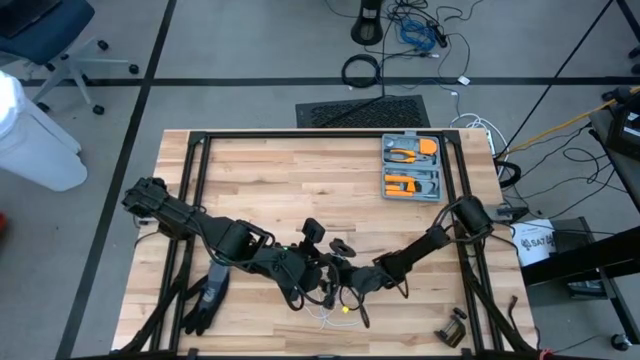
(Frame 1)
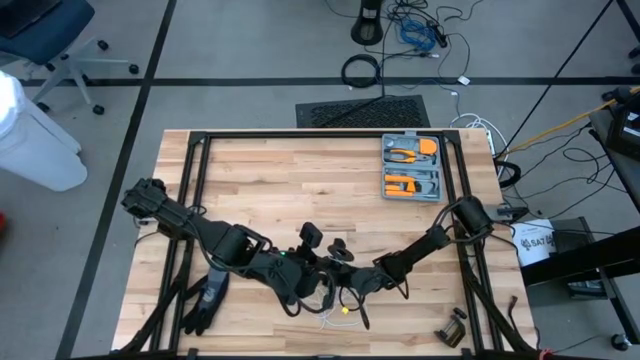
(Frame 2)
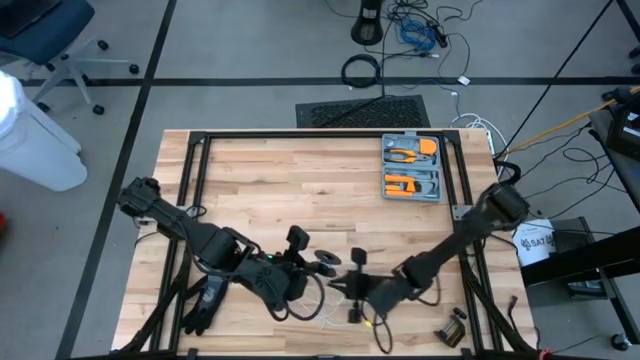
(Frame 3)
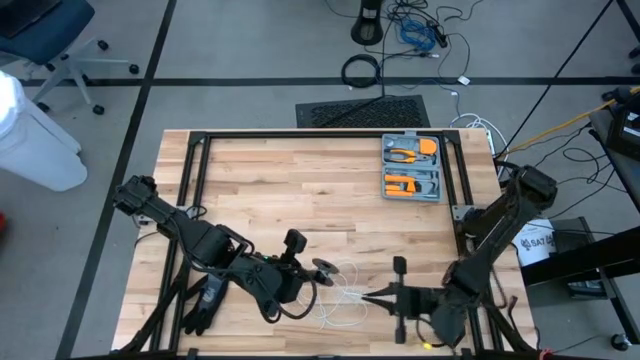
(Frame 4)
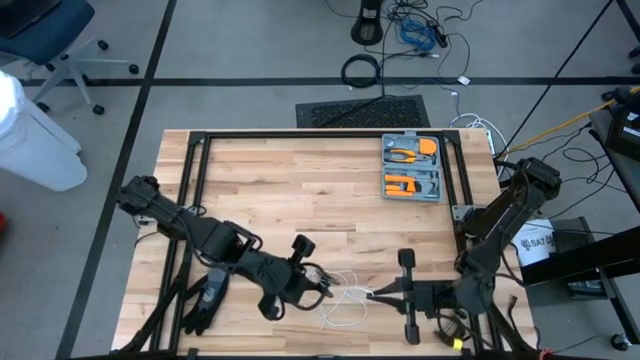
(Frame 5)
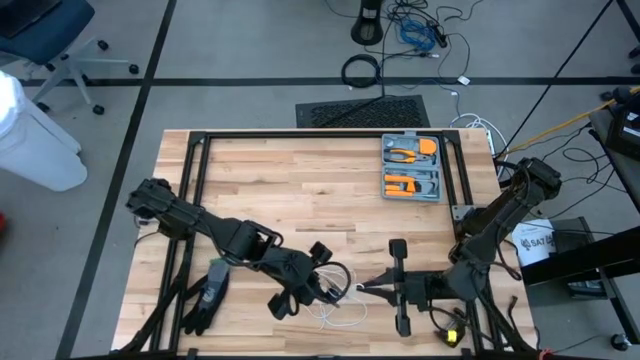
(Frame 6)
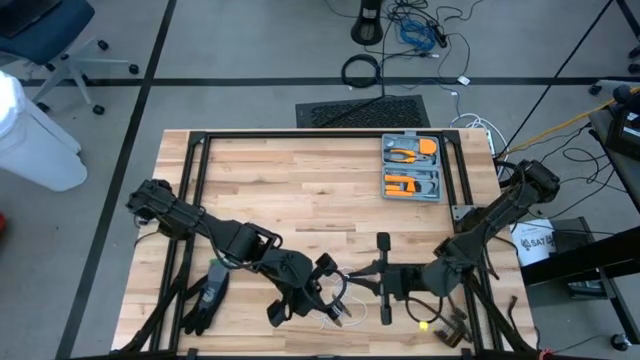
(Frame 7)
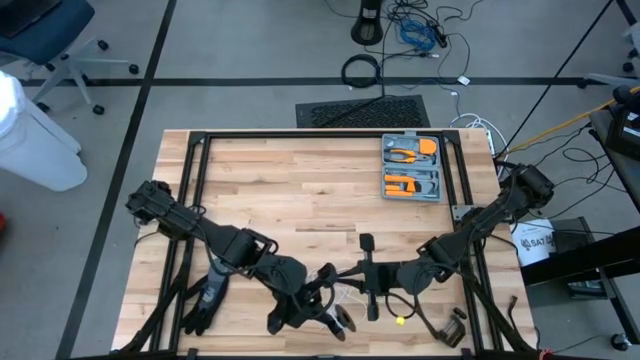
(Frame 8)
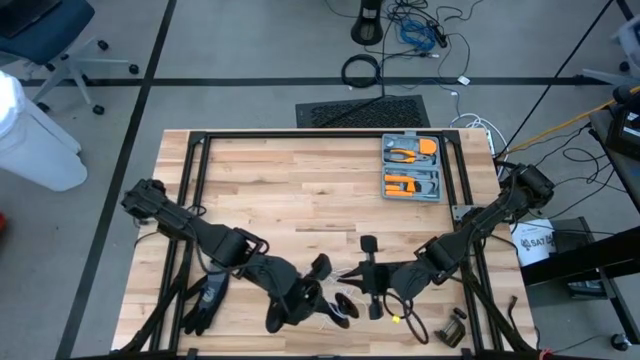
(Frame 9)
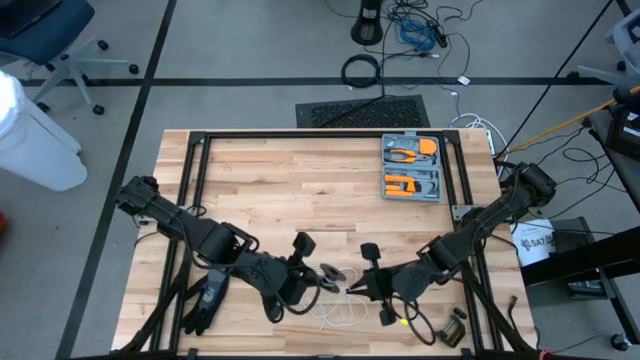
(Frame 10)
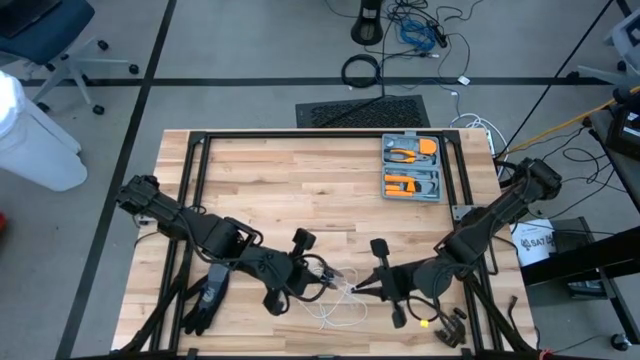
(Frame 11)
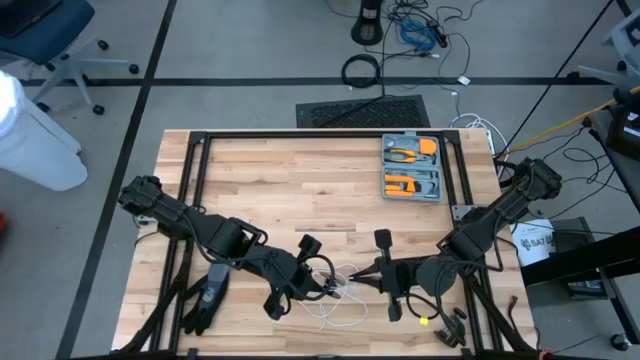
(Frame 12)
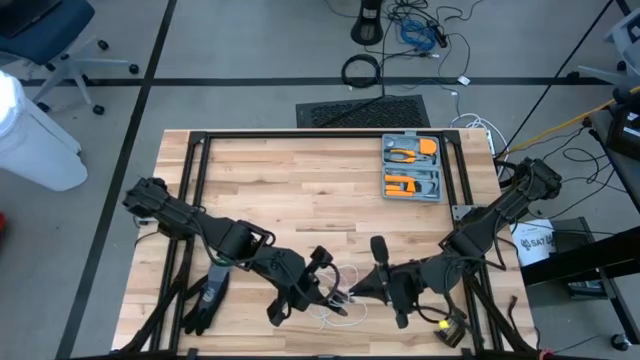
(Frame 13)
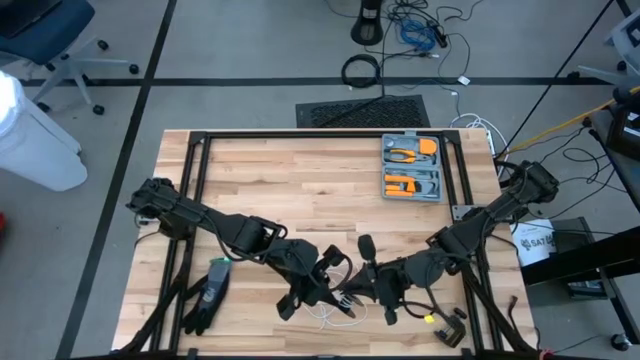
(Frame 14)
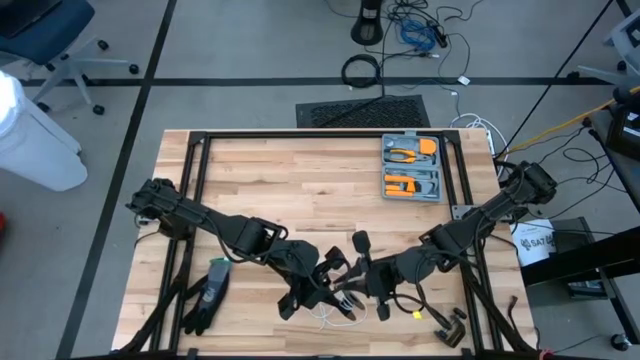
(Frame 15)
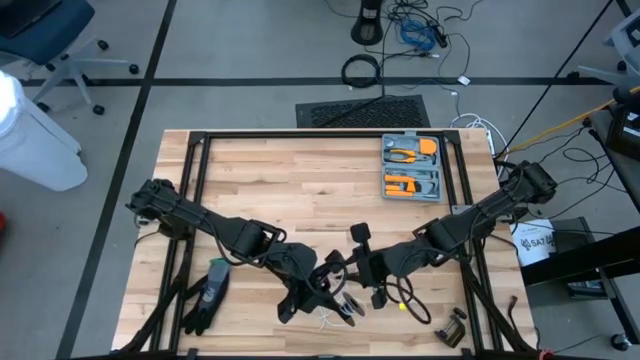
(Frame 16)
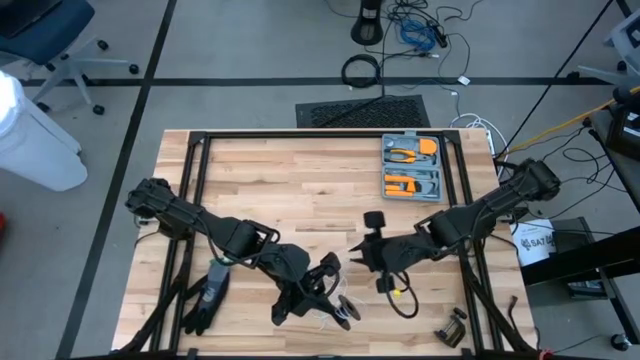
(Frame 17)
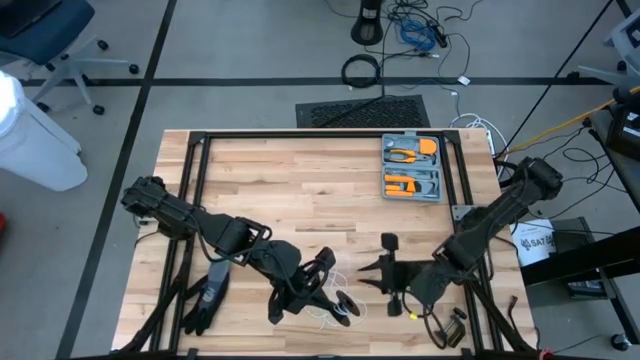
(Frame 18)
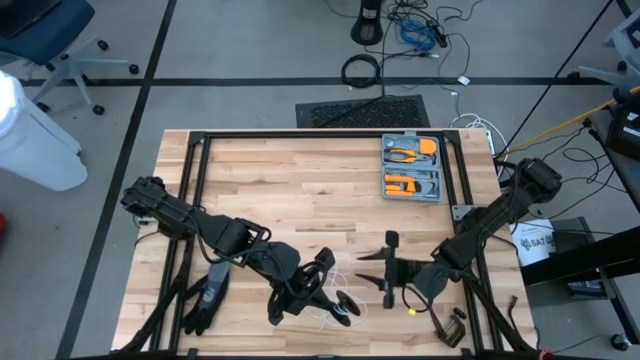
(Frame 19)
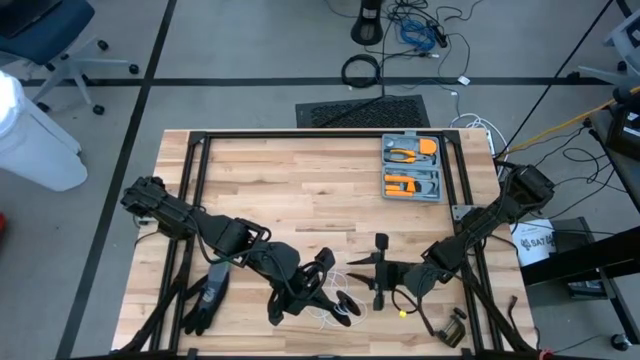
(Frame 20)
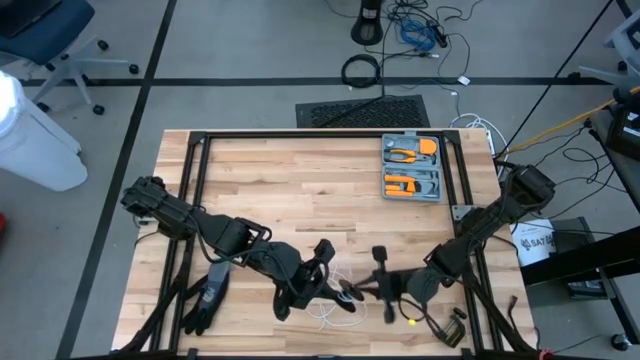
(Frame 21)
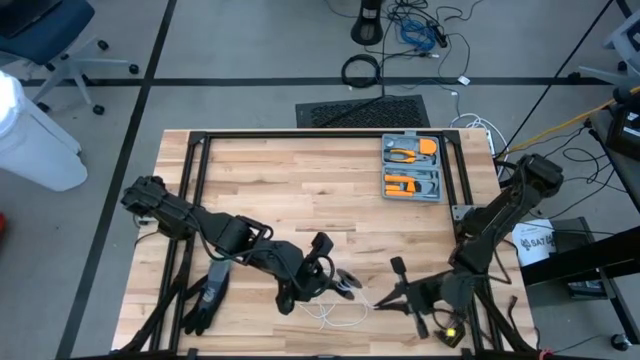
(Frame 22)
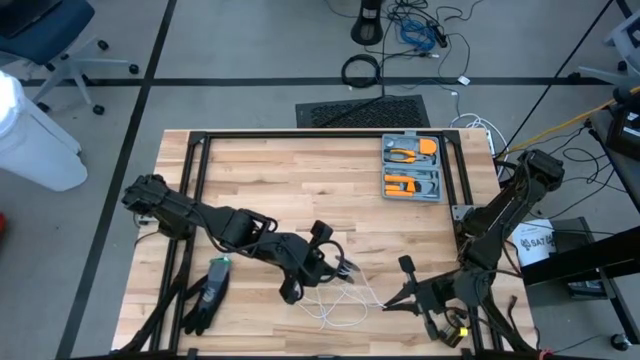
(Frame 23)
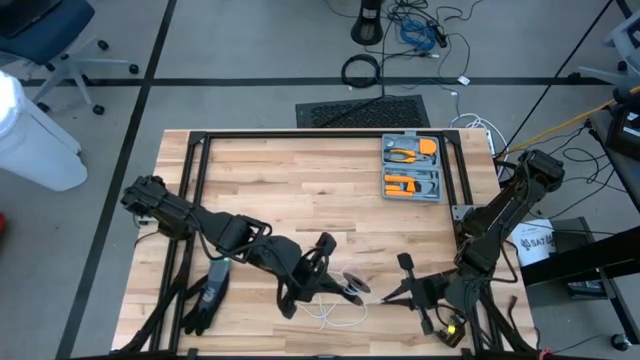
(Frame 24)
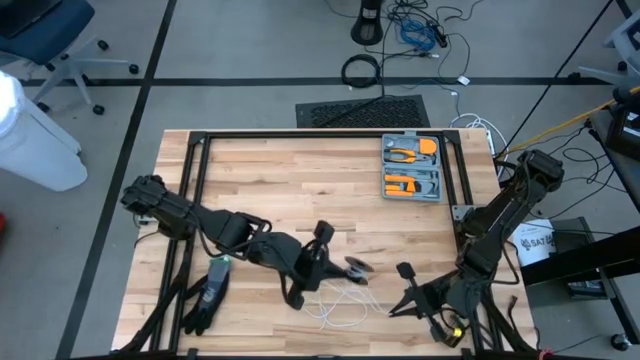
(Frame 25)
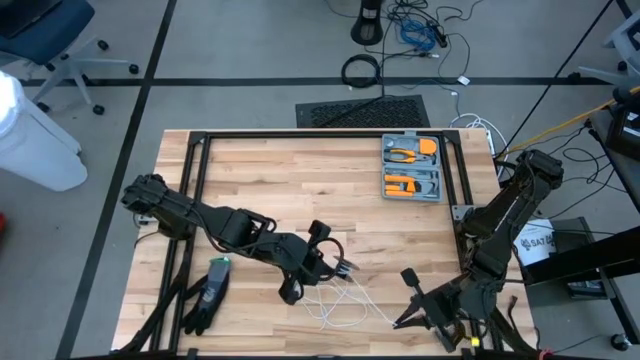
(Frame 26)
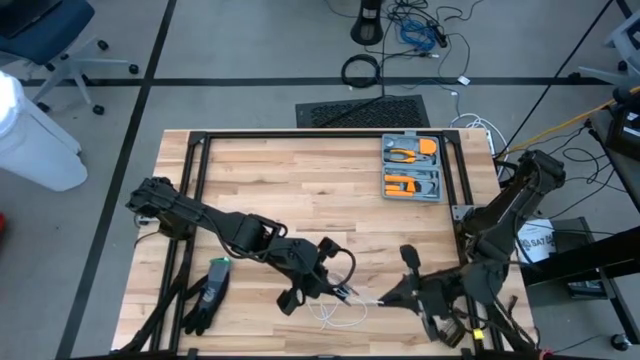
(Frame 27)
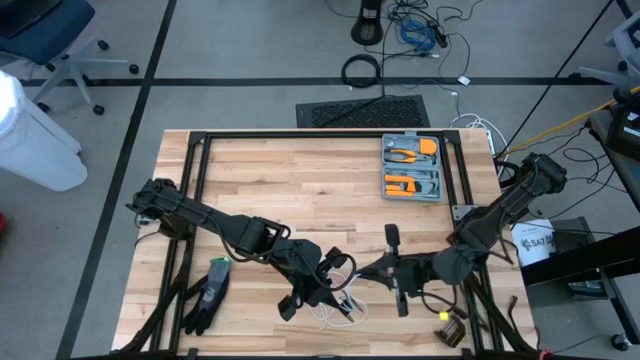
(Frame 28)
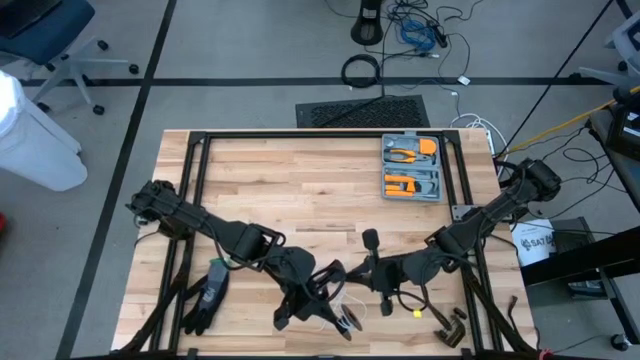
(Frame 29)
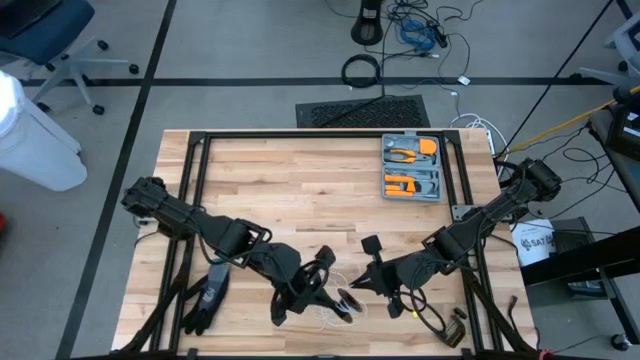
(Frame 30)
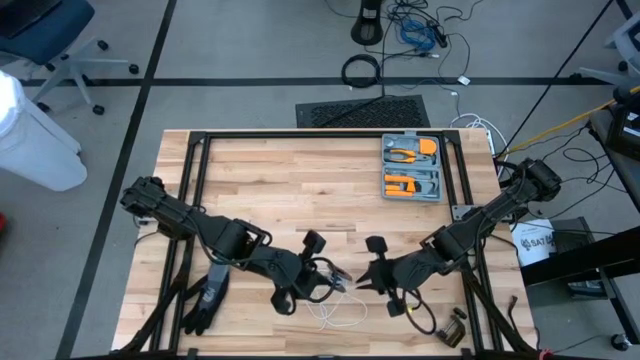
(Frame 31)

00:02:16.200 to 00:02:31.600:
Task: Coil cords
Coil the white wire onto the spool

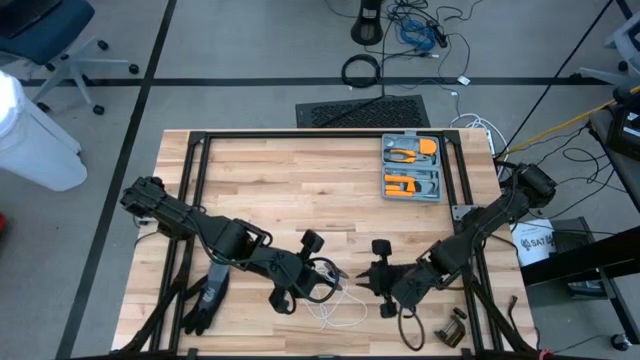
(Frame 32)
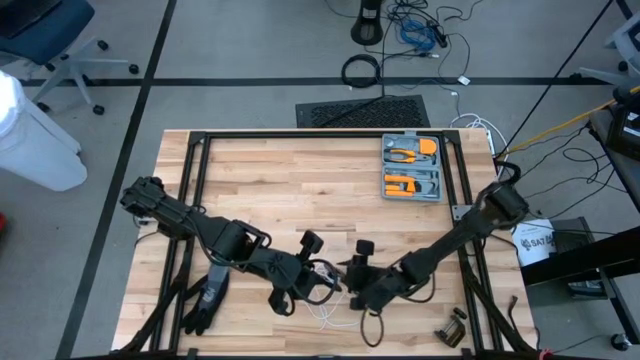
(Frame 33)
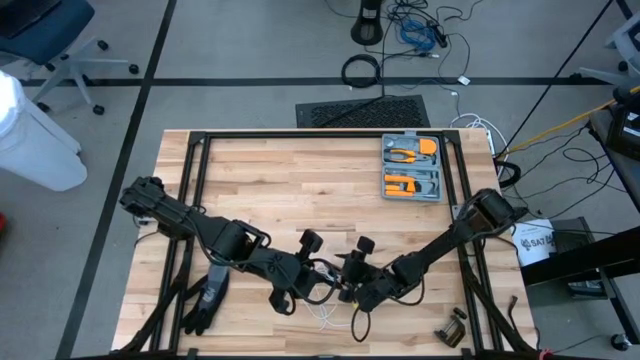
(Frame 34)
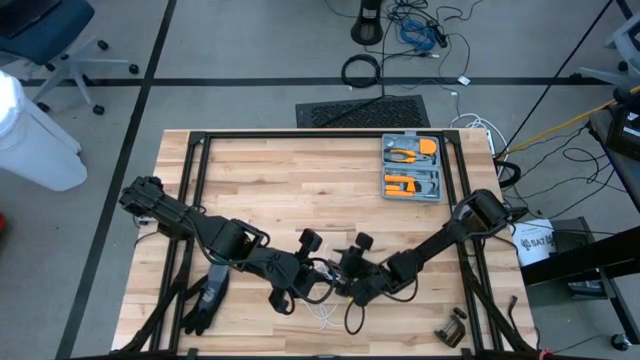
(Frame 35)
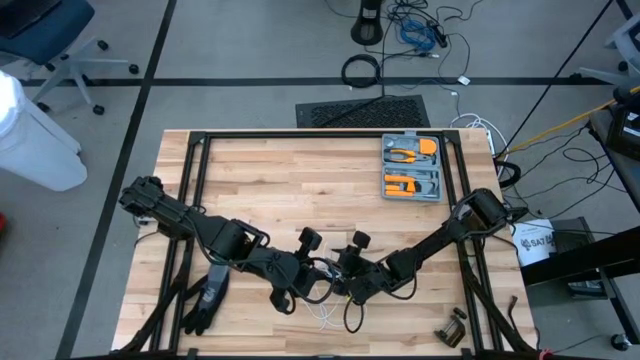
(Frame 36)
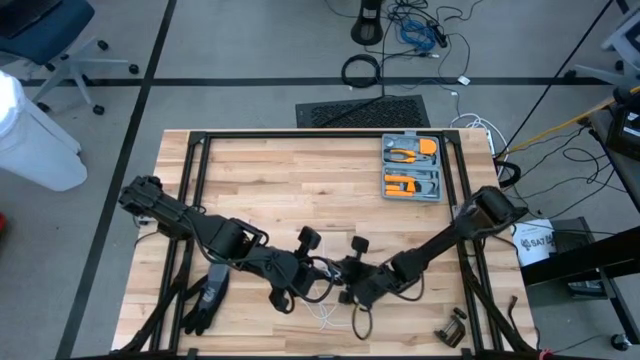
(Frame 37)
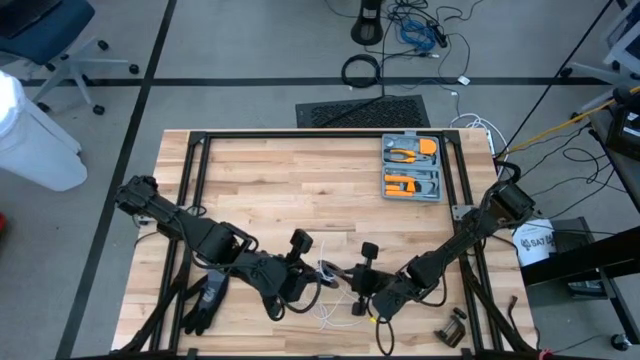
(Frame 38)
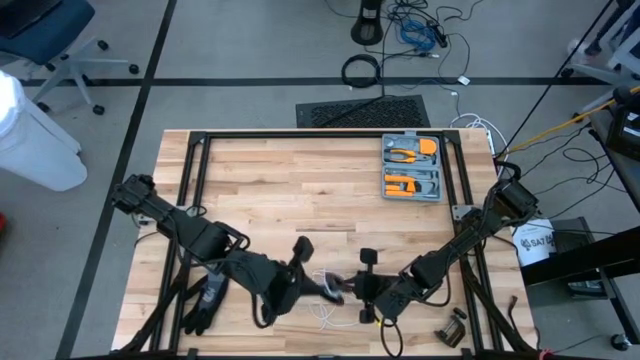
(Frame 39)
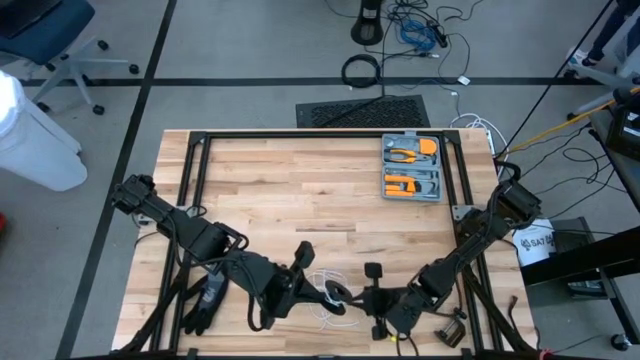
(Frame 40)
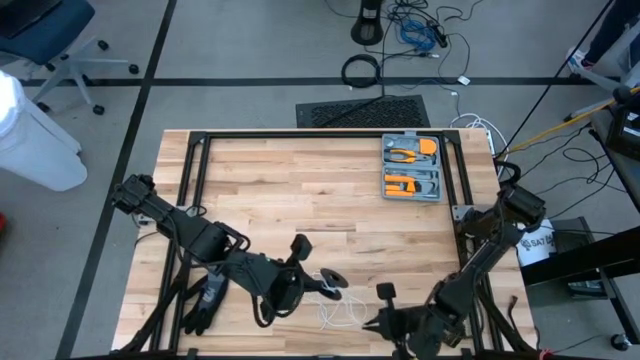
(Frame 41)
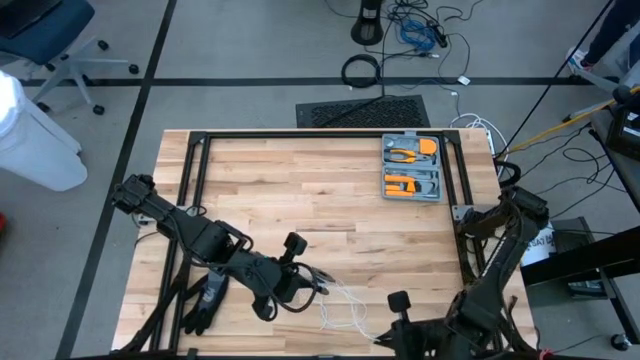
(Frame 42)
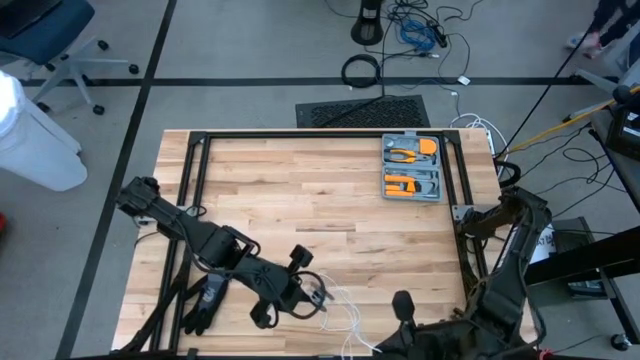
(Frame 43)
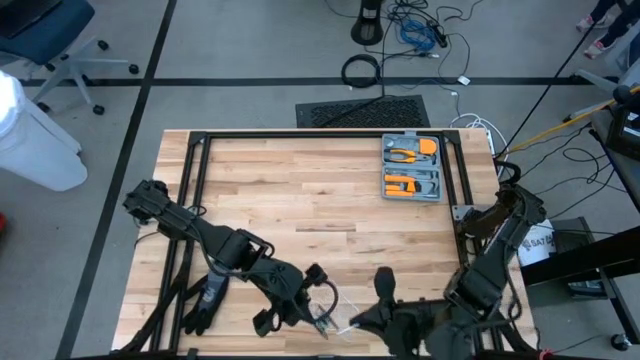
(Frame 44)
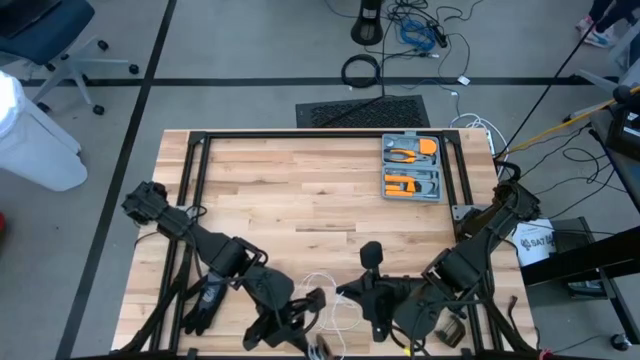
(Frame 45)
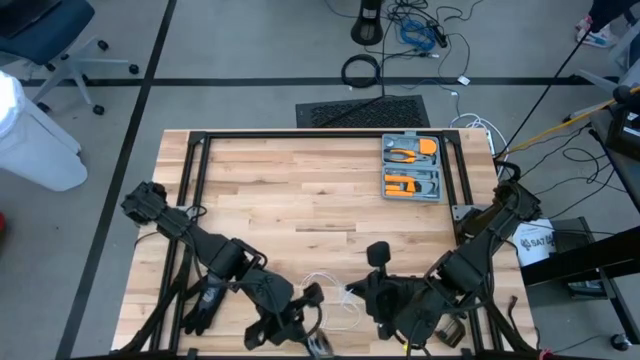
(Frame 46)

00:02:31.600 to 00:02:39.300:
Coil the white wire onto the spool
